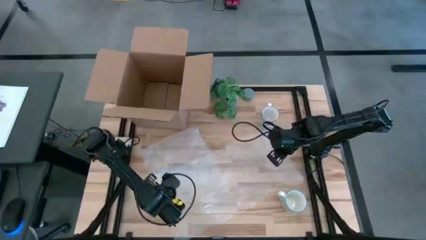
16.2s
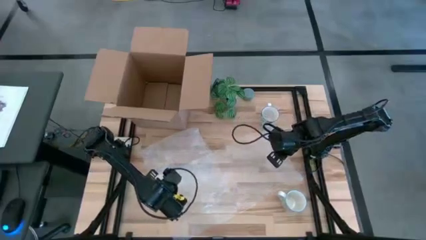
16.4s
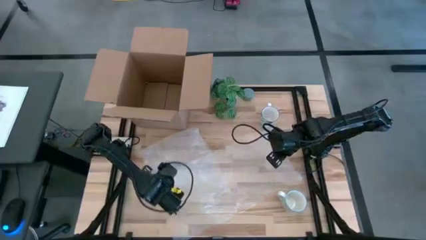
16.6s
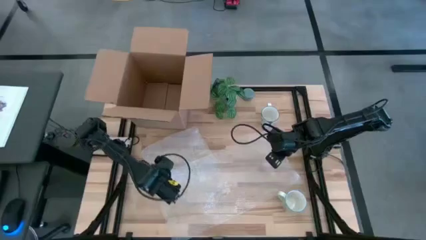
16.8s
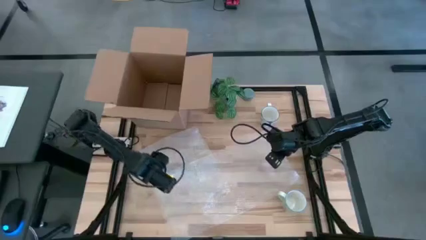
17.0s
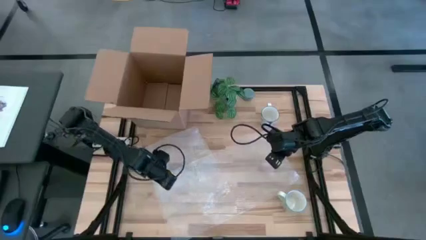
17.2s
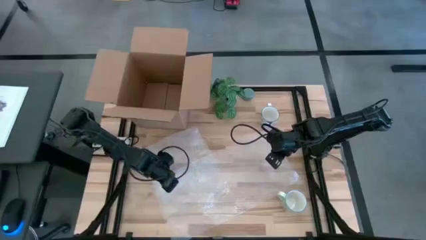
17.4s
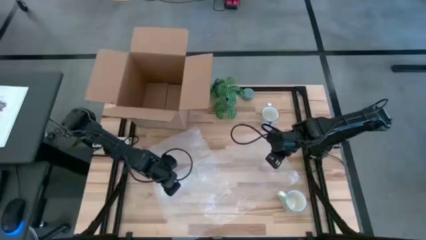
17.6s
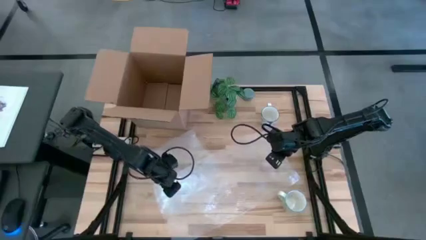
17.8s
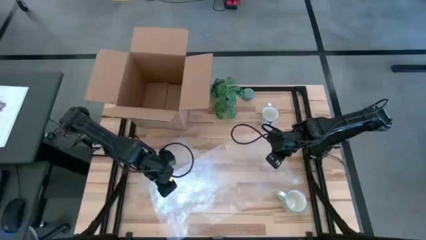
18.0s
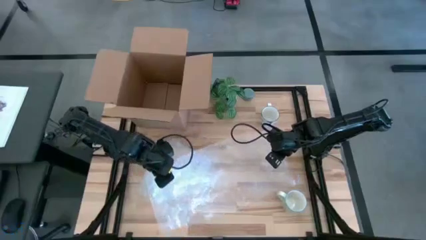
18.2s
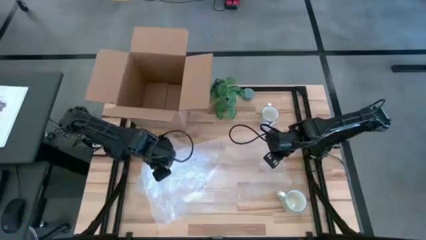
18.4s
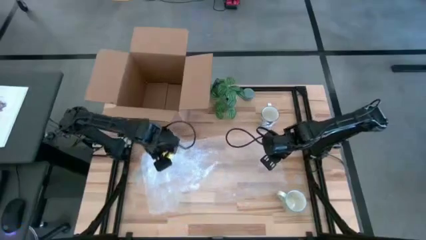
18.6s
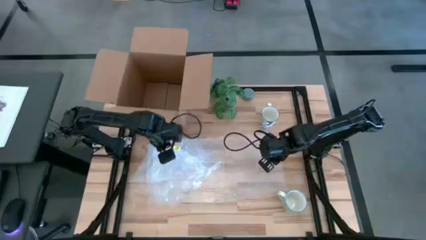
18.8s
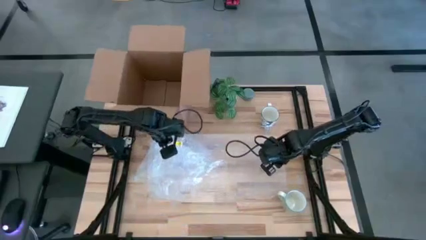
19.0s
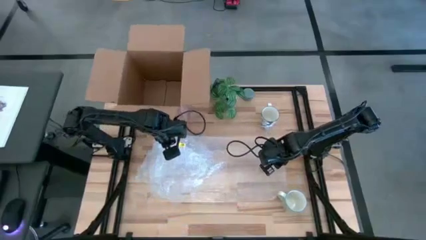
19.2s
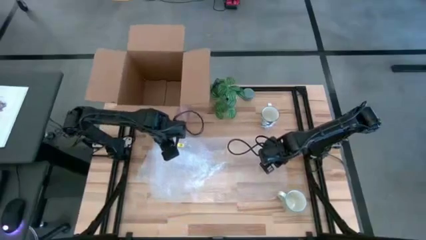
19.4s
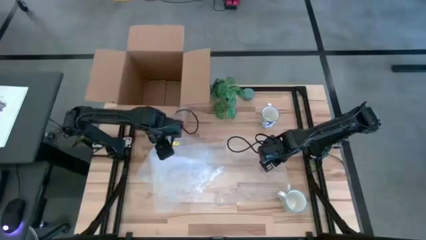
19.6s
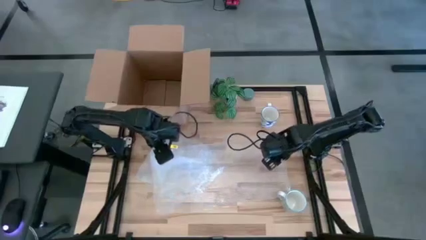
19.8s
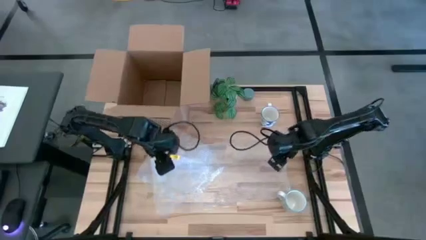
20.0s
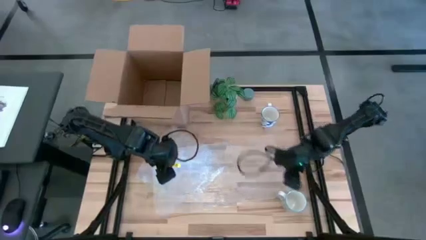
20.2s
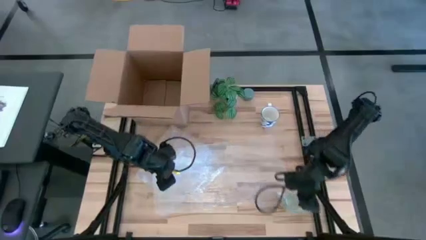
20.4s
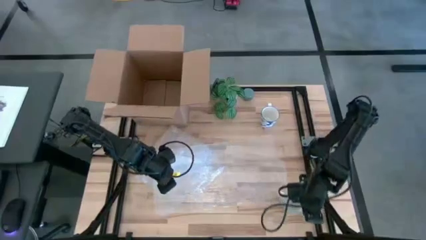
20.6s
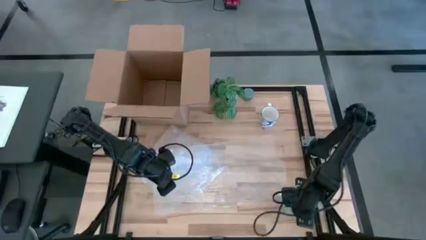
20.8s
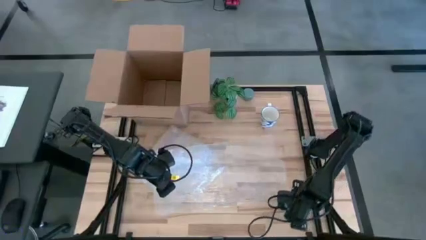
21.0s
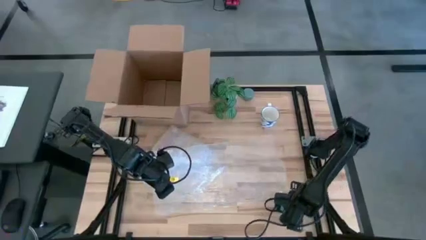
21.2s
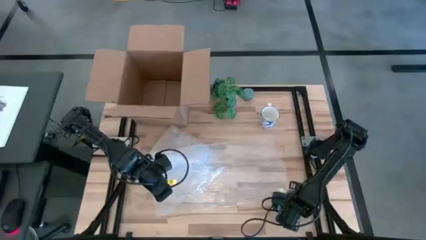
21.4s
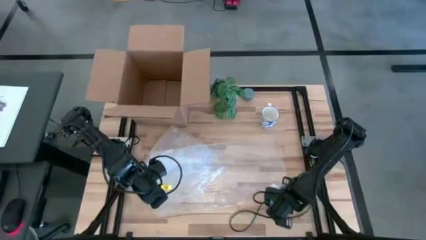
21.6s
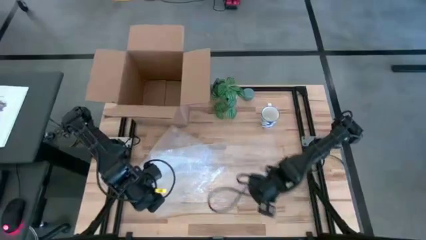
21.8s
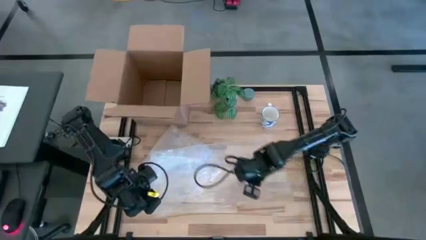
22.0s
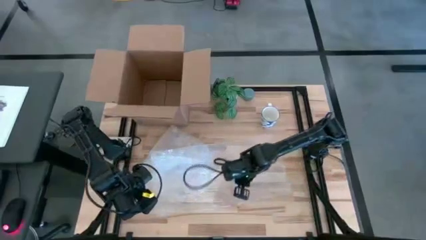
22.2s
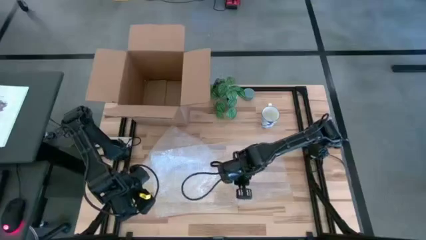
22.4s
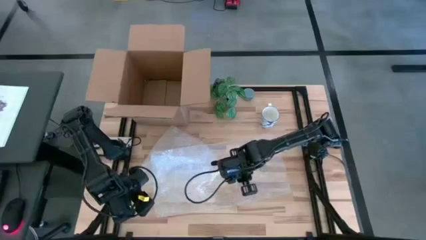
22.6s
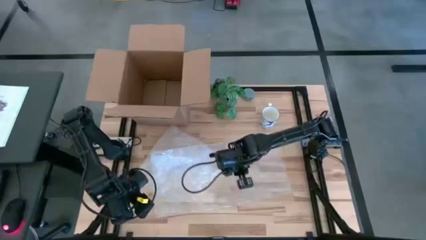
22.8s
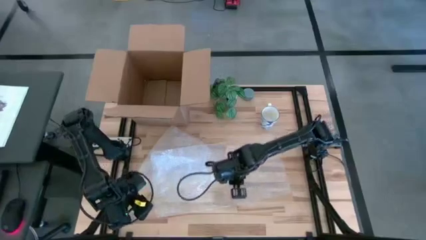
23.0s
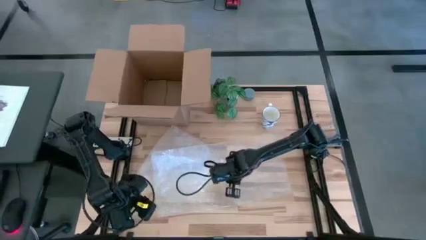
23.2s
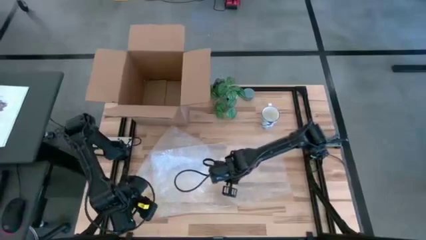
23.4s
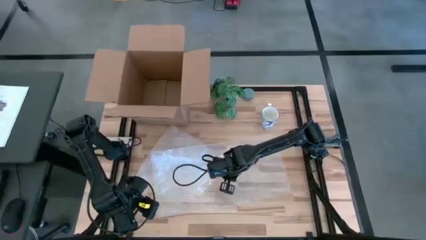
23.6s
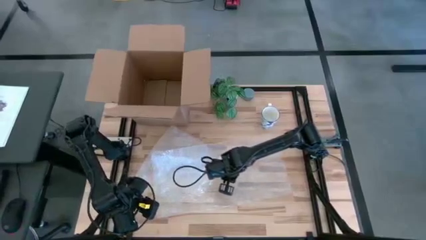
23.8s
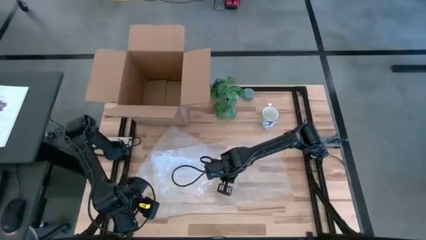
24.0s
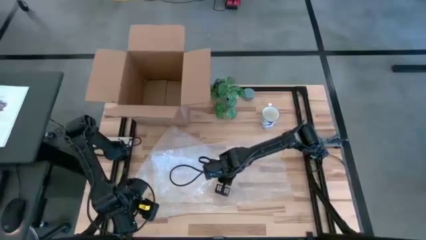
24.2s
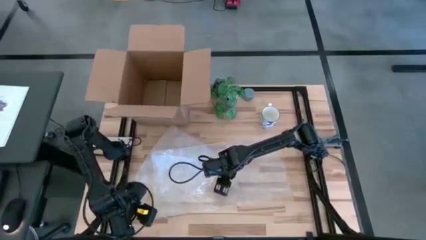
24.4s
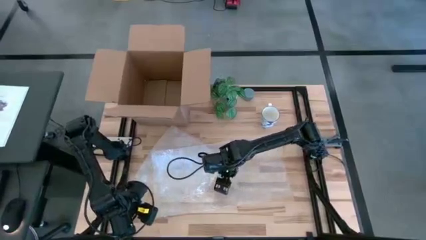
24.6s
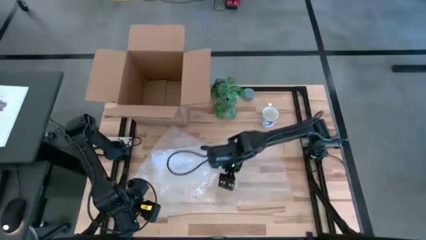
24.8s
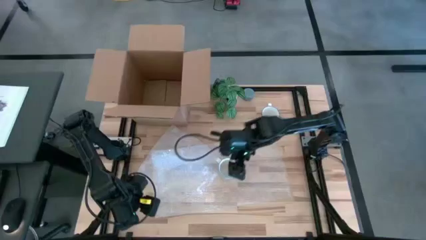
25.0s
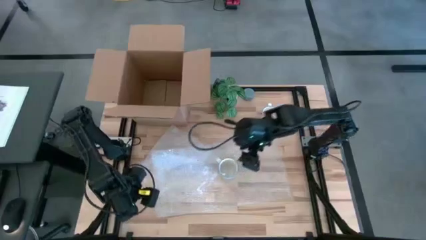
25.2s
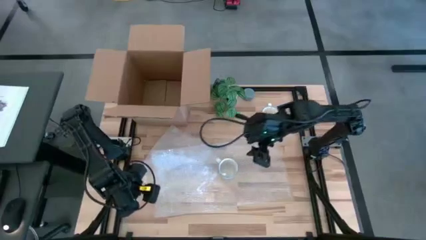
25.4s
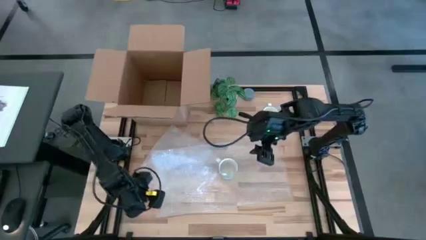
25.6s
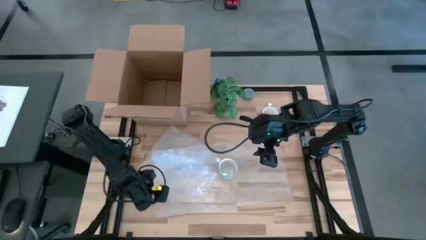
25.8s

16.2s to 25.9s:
Task: wrap mug
Wrap the green mug with the bubble wrap

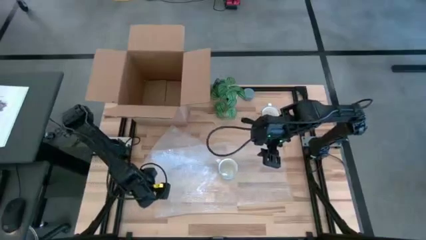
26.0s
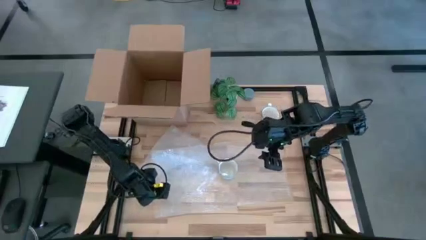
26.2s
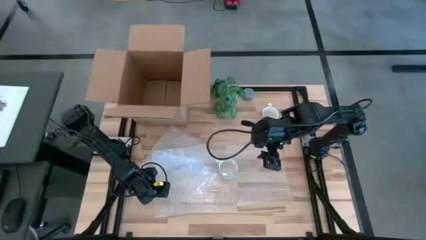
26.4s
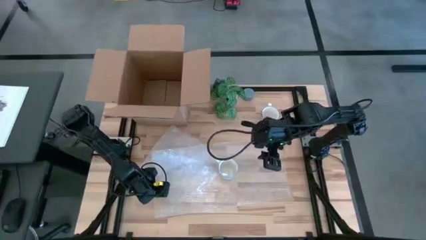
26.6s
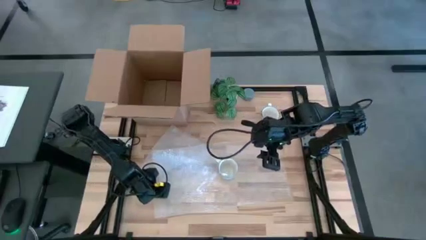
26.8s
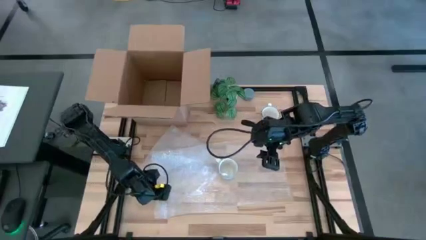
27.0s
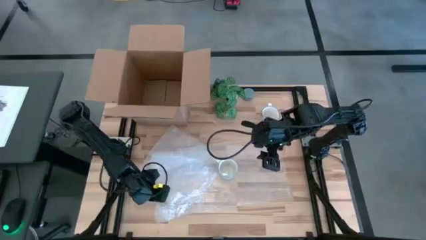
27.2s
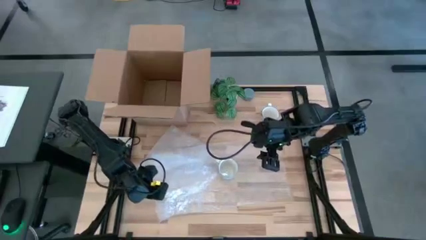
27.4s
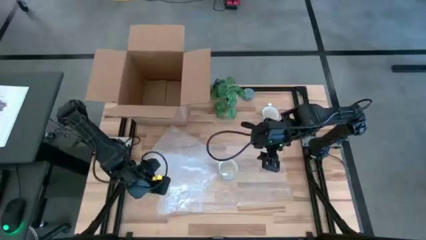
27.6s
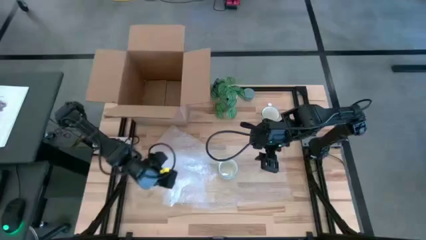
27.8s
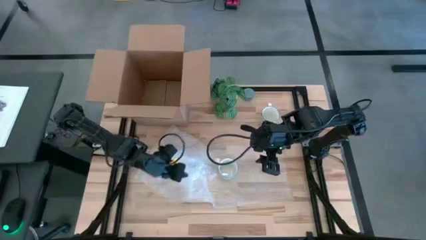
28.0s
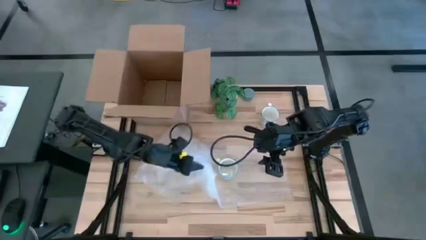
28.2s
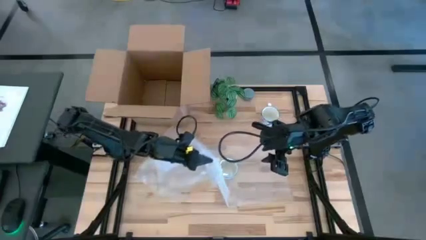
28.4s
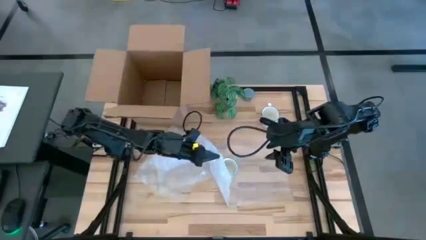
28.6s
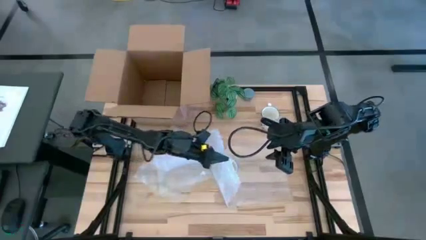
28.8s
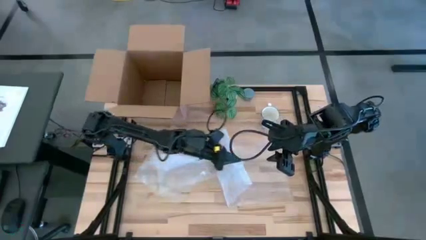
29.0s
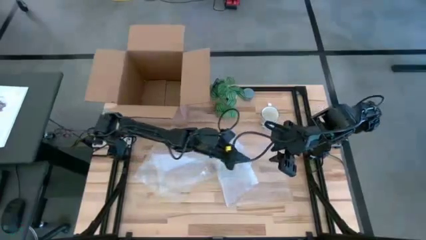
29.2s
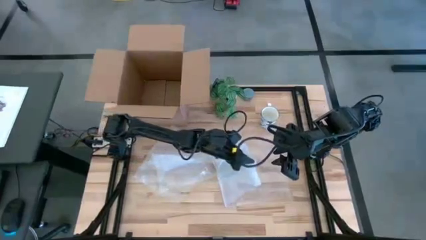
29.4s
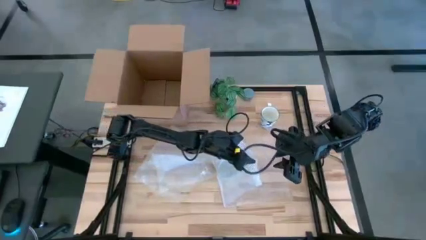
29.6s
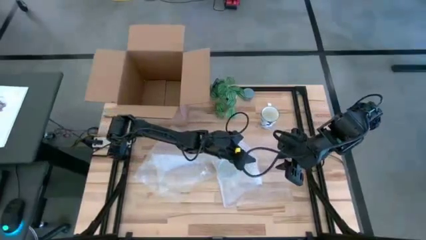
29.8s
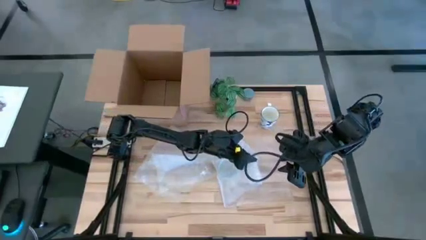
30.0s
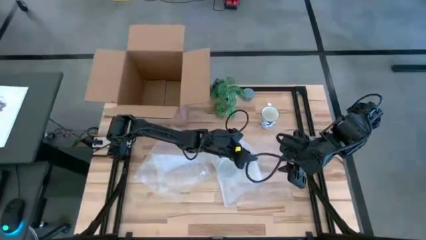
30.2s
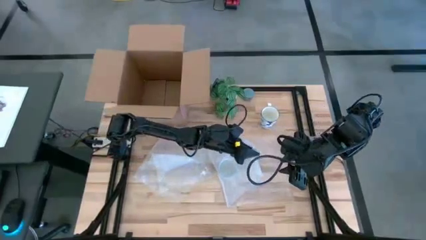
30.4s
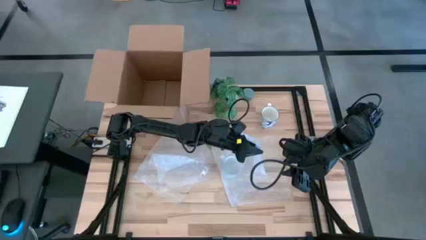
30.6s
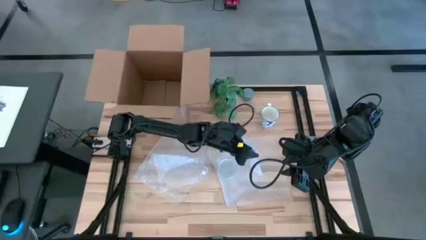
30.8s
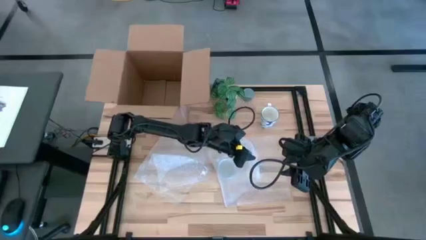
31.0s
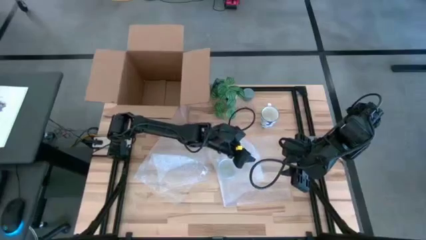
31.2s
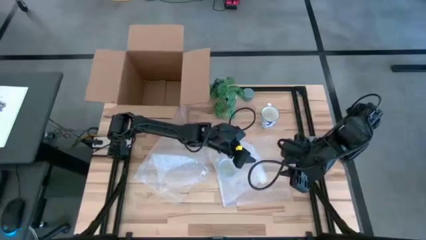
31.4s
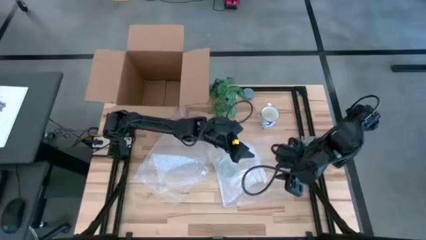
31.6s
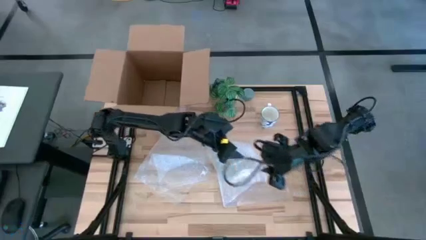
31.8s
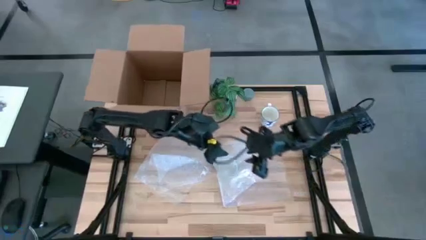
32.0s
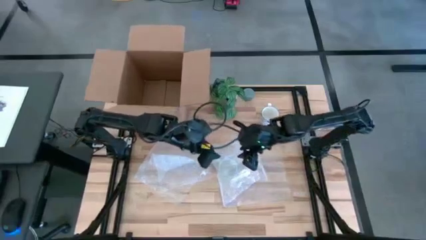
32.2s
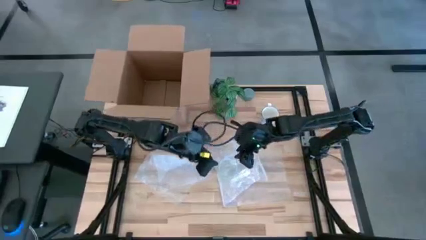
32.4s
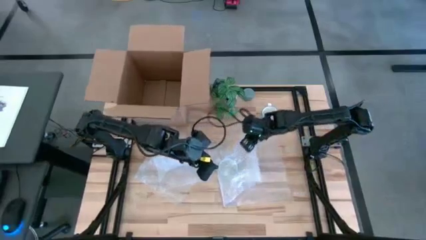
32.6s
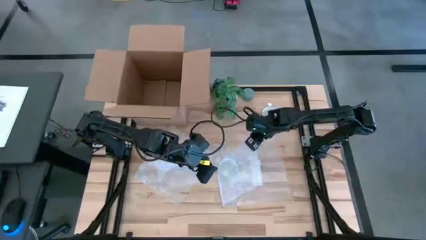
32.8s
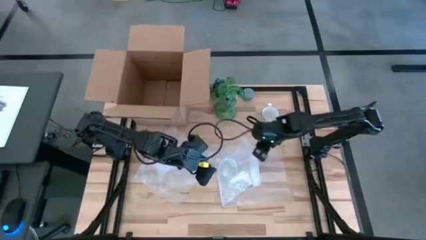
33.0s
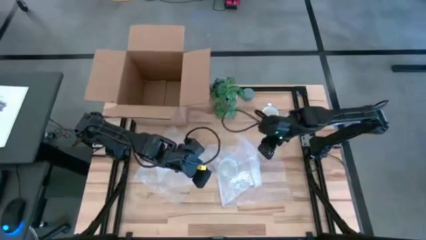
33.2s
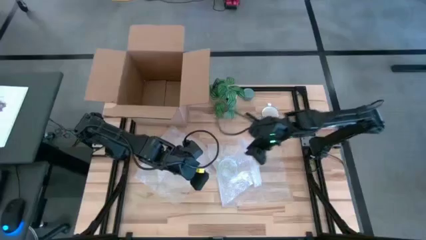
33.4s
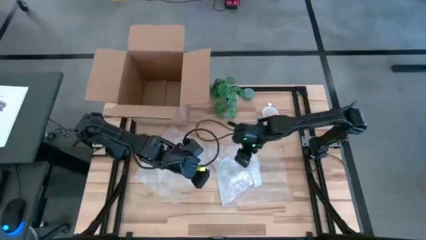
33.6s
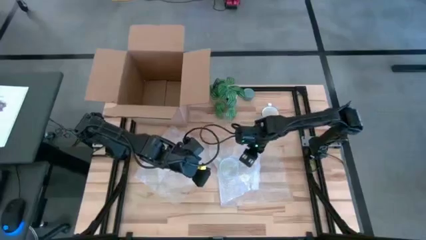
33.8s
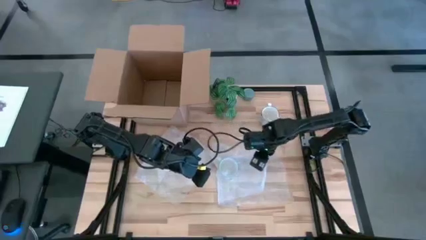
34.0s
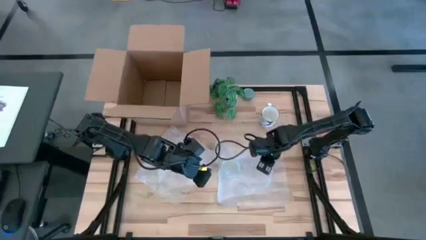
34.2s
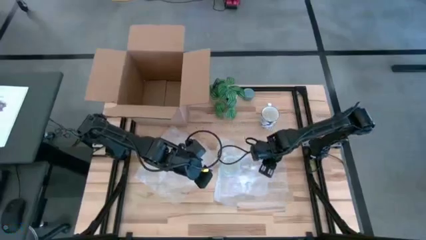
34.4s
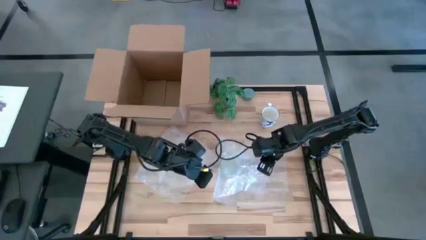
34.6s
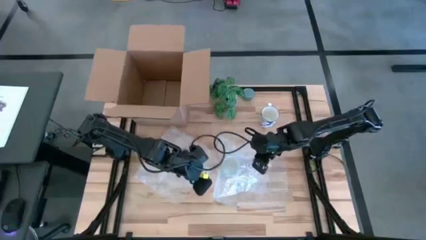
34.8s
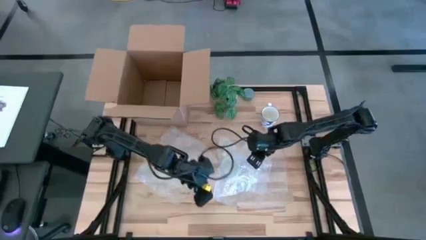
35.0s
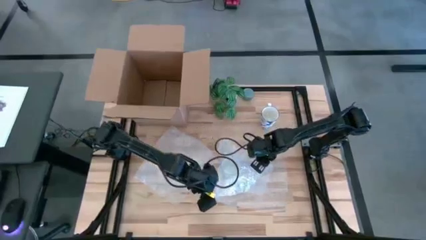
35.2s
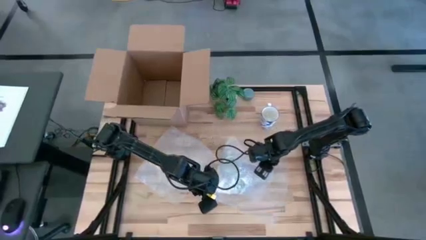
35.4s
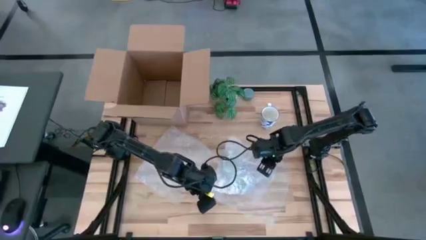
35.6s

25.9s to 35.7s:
Wrap the green mug with the bubble wrap
